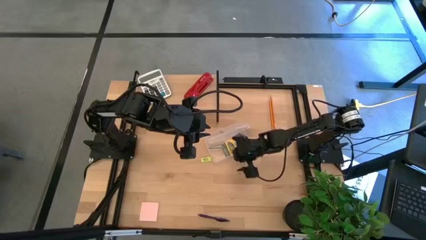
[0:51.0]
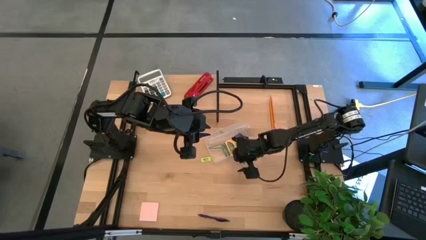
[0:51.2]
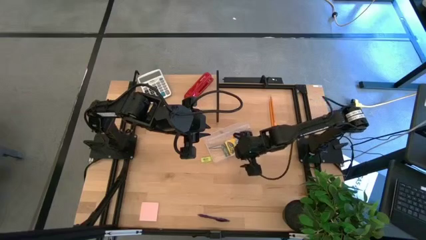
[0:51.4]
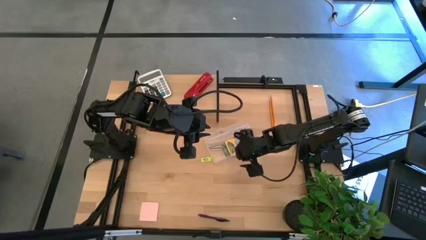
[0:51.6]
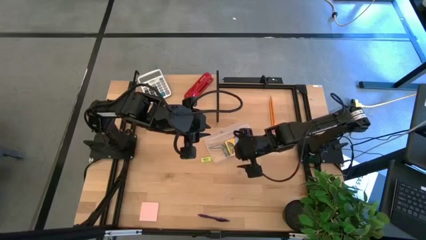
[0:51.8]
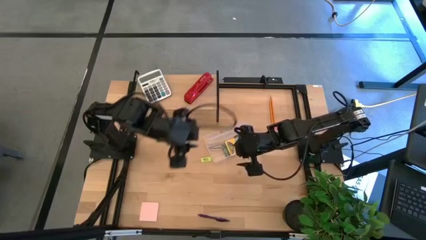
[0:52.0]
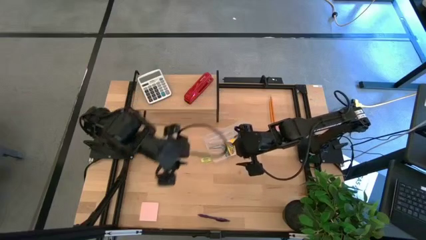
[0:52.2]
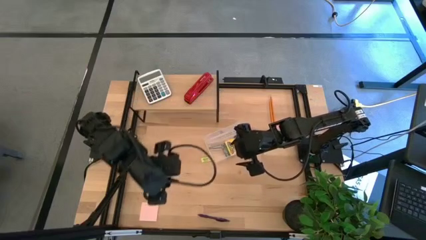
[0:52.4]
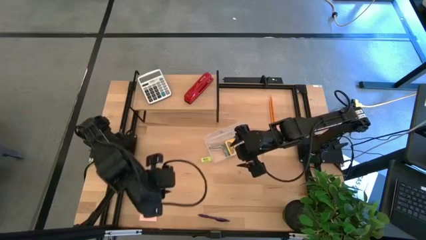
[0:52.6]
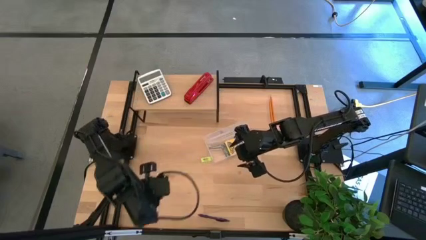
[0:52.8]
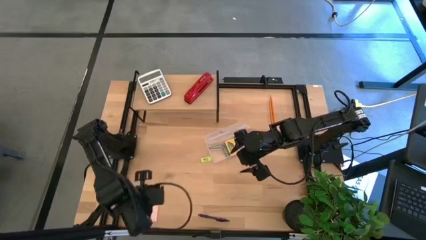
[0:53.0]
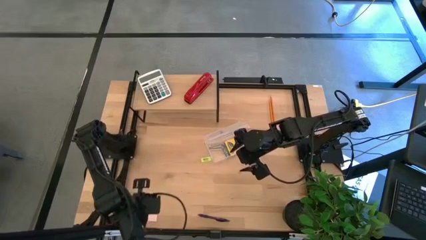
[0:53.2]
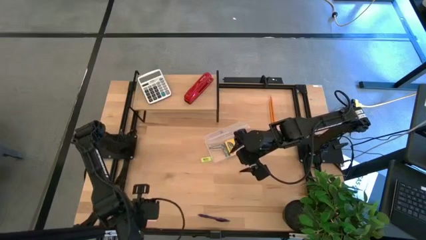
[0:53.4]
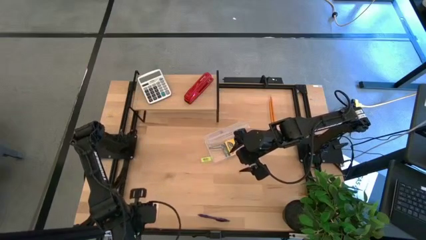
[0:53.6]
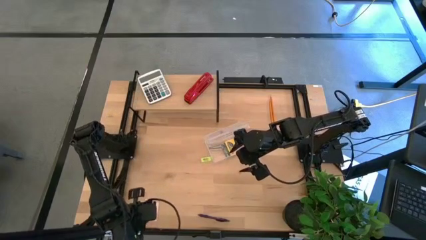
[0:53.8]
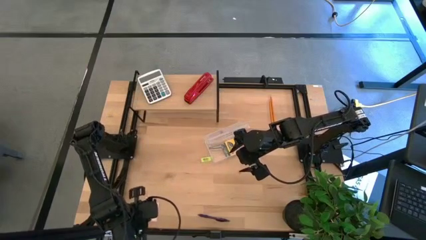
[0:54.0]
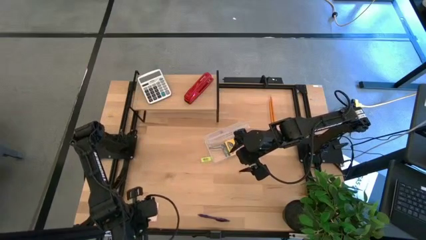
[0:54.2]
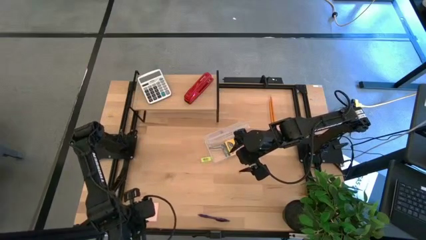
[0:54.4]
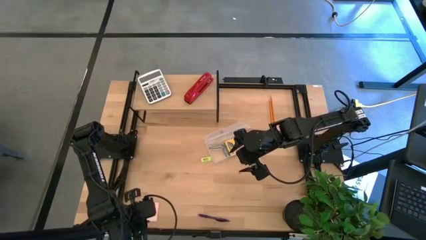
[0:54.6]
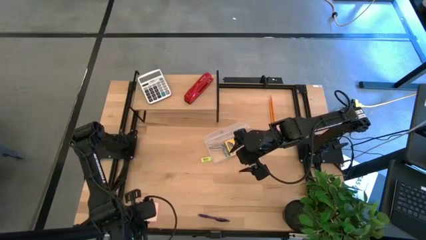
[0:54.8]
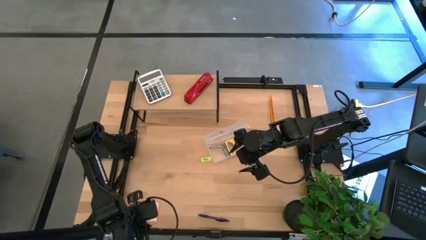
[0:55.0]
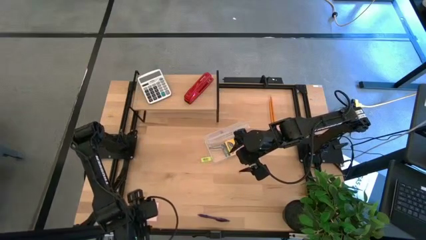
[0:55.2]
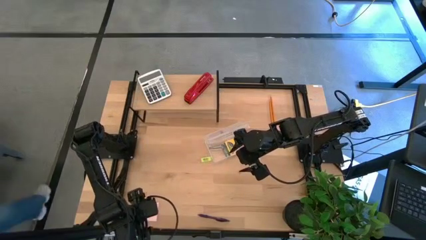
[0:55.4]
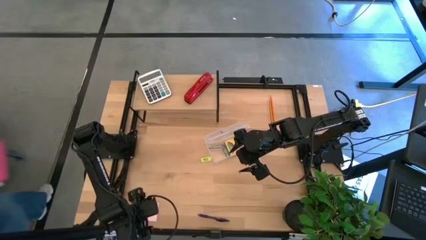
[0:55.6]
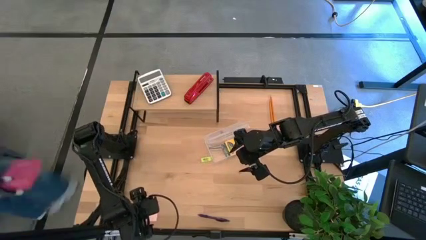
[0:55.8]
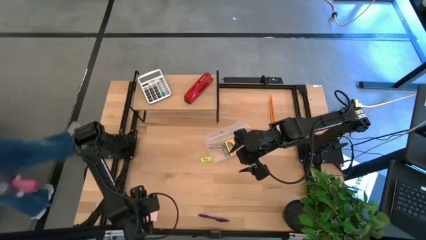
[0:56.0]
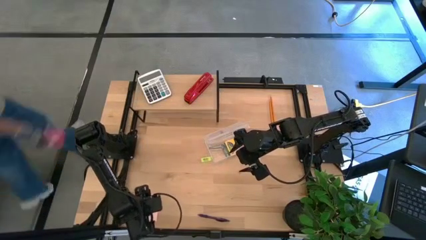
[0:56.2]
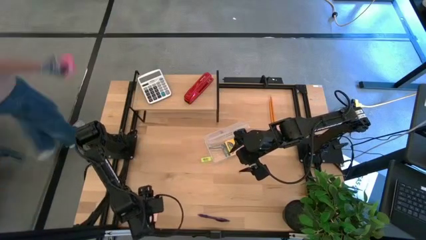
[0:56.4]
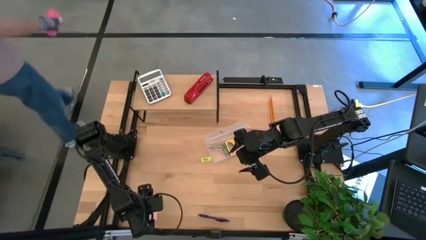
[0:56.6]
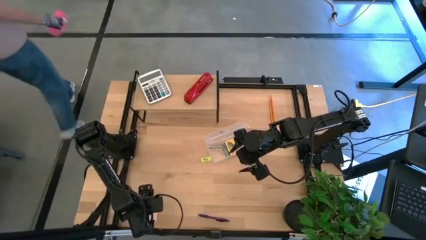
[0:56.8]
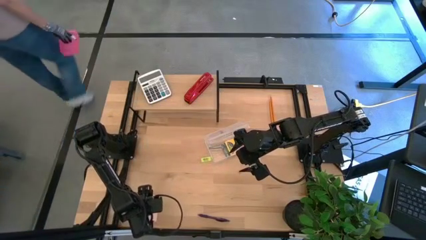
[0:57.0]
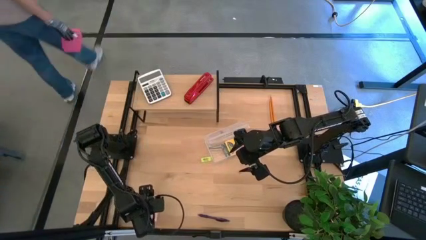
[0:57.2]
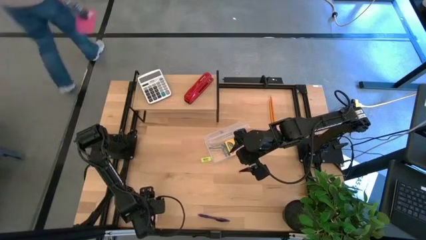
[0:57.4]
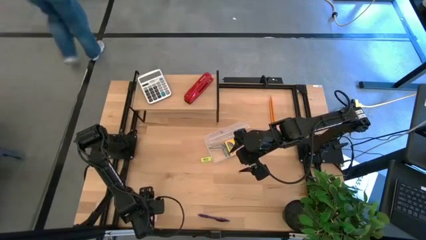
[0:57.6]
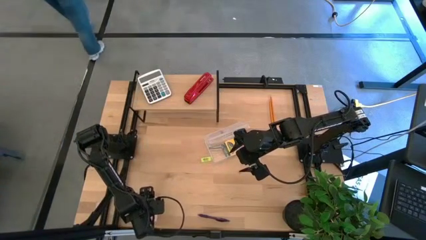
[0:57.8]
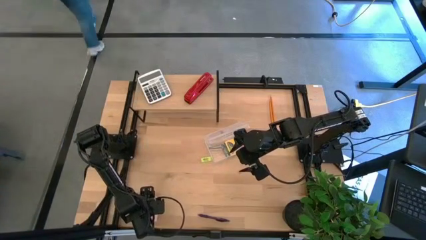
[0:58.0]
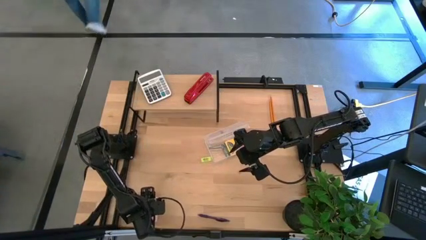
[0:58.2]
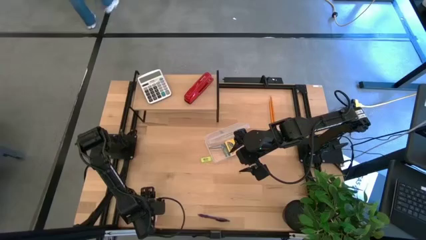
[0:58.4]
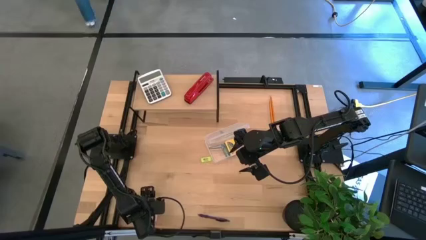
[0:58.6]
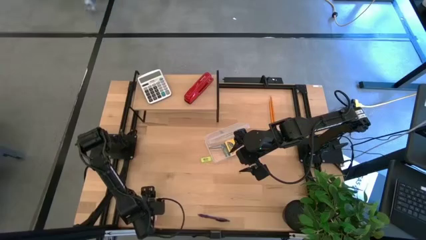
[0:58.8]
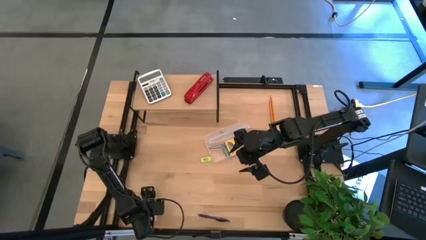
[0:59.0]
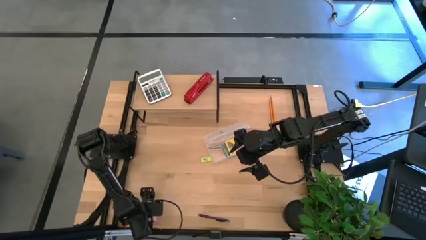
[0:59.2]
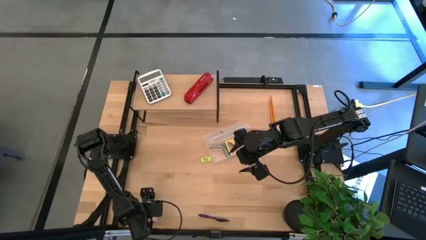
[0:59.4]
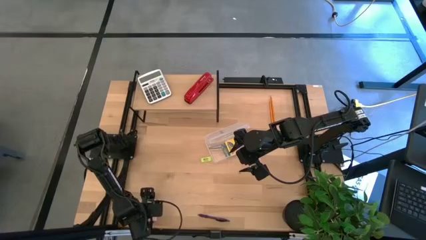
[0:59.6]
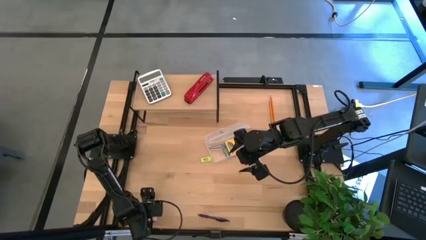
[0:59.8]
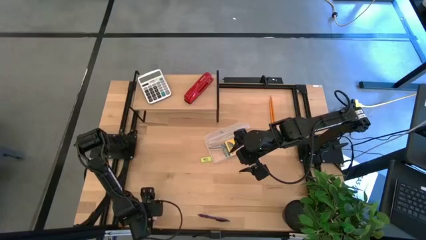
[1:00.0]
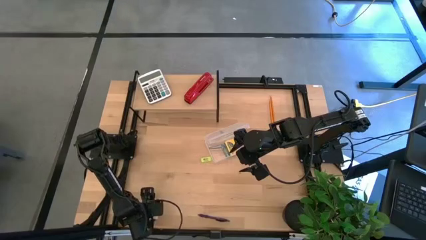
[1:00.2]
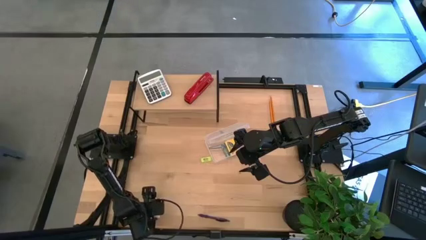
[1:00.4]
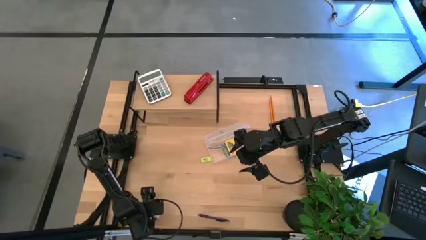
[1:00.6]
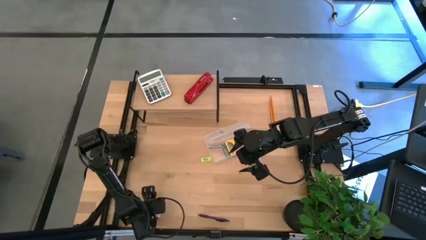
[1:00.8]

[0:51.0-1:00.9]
Task: Pack school essentials
Put the pink sticky note into the supply box

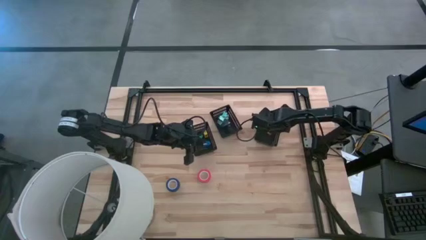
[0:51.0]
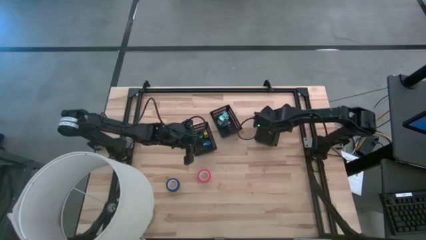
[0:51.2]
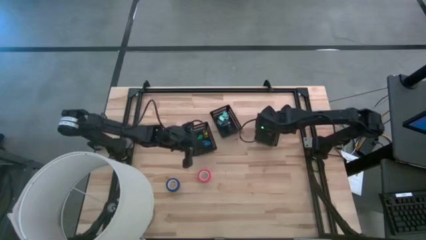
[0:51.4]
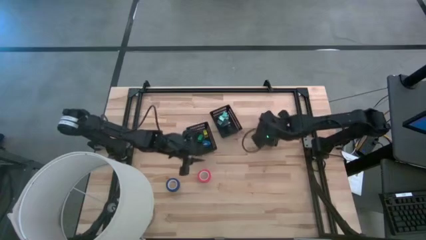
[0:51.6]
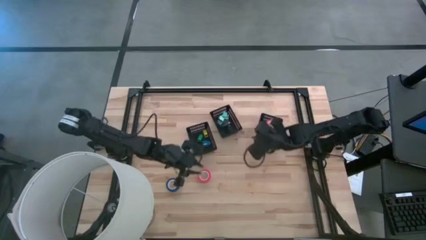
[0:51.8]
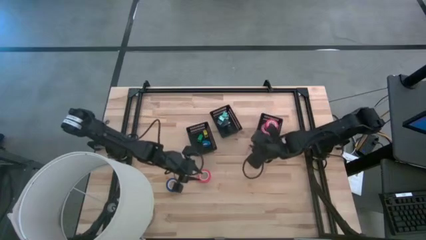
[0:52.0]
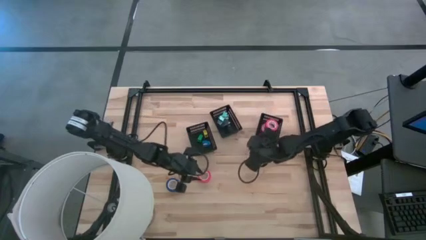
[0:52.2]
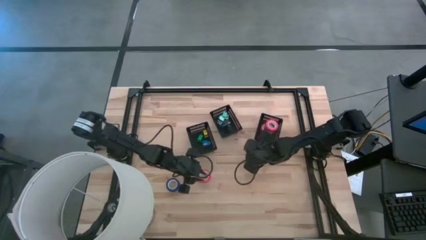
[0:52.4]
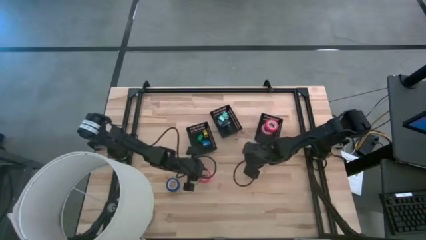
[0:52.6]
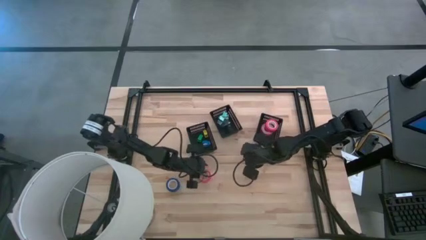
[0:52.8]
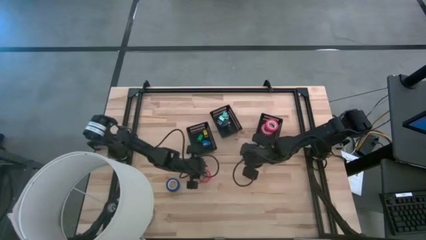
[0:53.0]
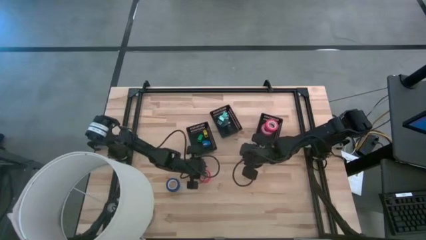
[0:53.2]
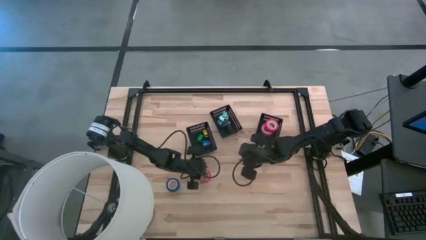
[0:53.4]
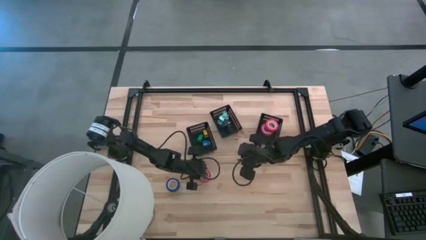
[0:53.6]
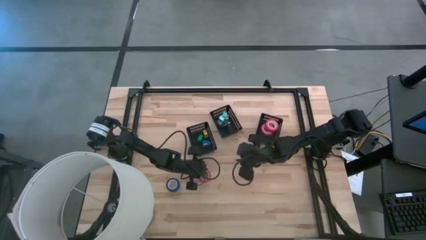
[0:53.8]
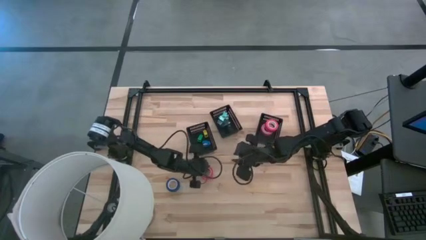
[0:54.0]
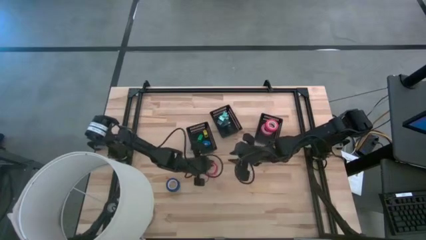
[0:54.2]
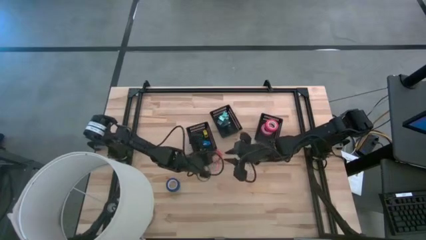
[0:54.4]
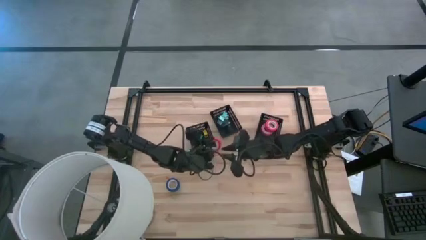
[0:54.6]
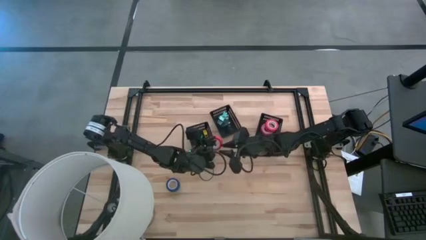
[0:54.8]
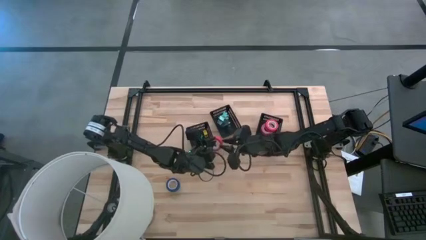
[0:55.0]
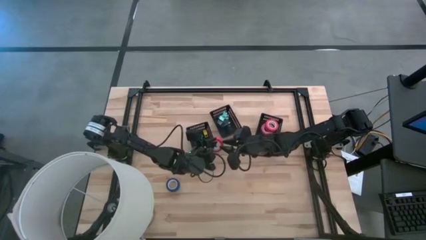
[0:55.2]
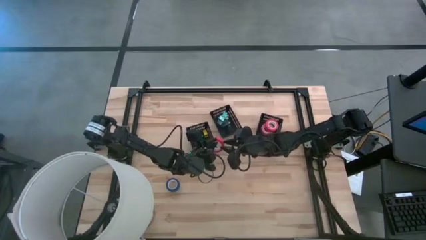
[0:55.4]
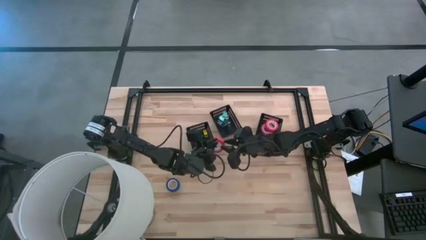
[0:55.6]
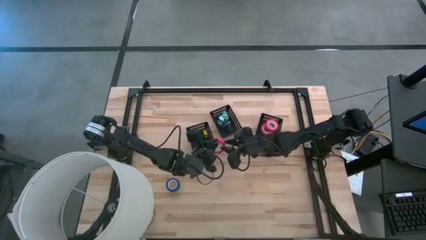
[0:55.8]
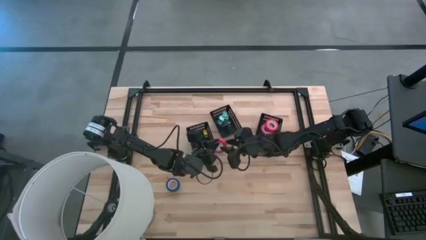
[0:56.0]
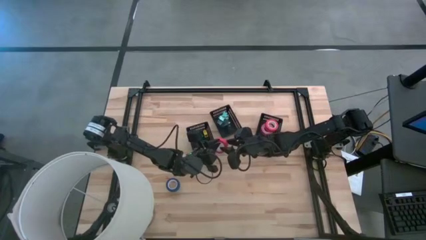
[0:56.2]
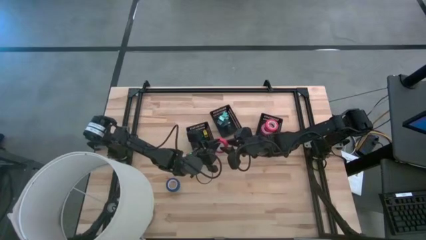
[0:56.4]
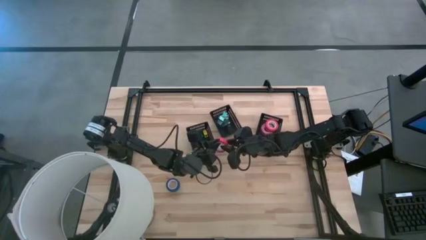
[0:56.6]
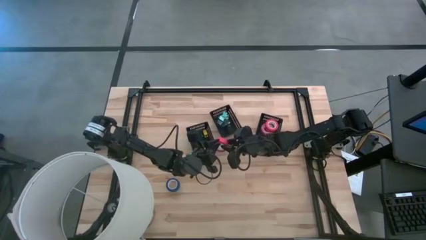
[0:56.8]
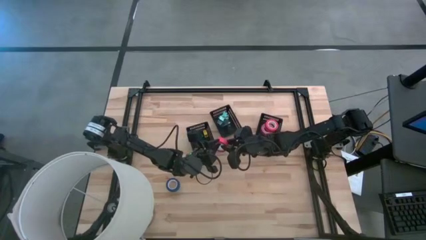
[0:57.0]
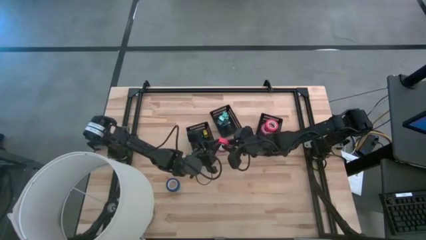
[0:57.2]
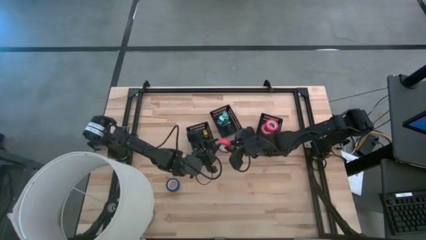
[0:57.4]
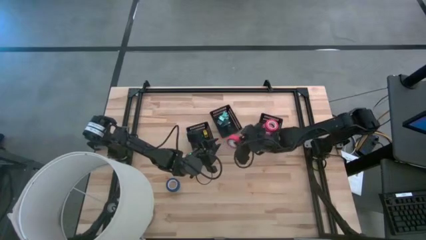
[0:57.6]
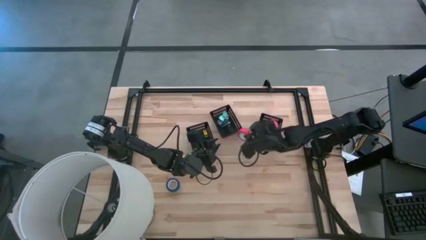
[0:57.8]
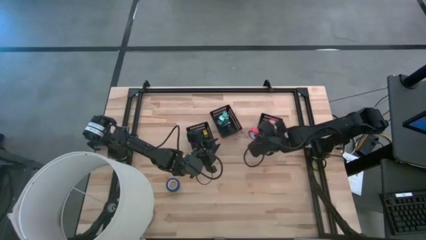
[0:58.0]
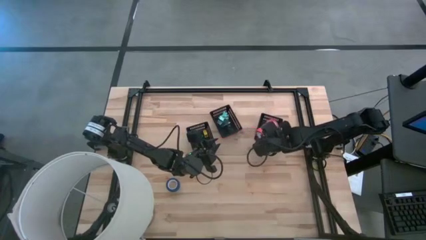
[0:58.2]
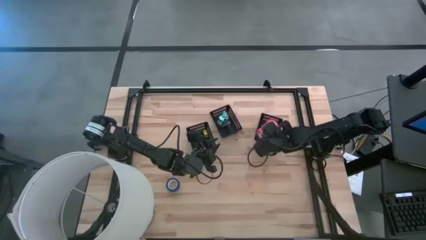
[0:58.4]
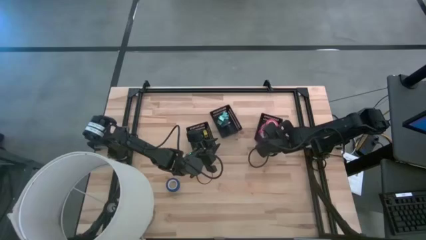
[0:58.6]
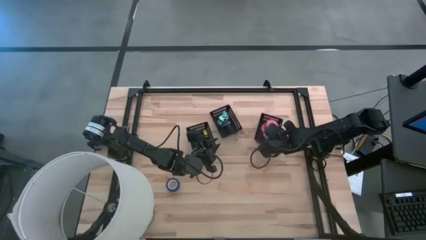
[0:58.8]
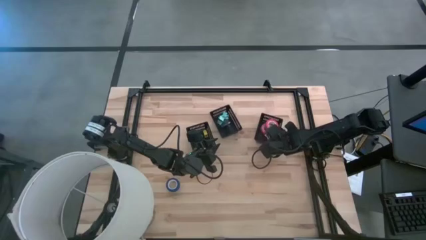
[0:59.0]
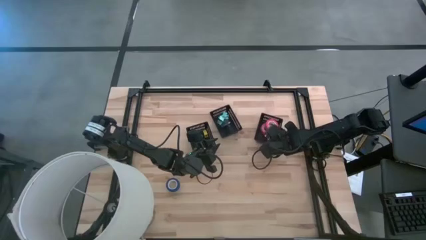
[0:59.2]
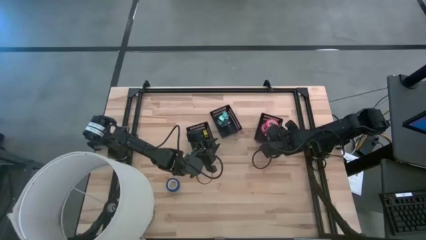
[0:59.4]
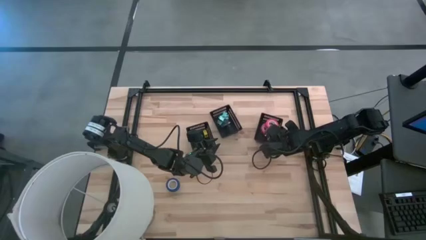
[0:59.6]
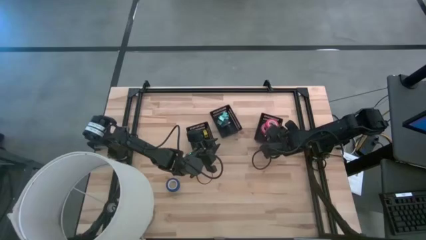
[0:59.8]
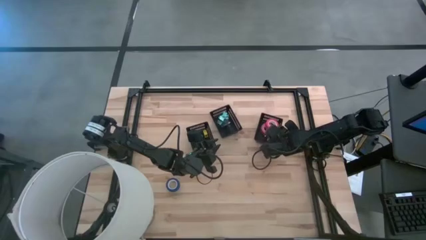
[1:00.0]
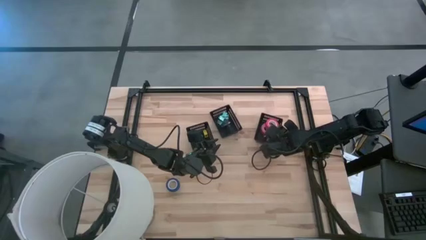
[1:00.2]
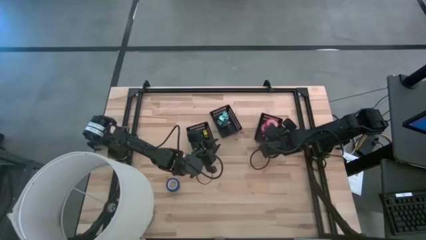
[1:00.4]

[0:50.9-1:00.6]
Task: Pick and place Stapler, Stapler remover, tape
Put the orange tape into the right black basket
